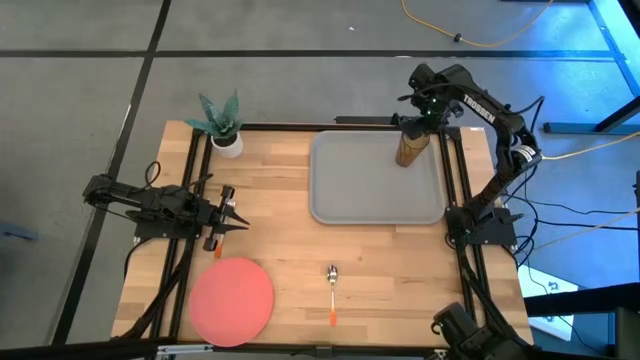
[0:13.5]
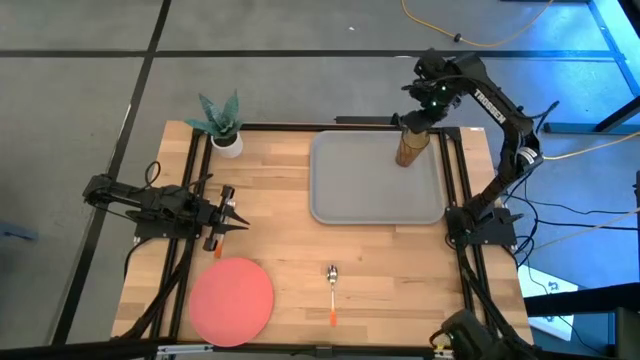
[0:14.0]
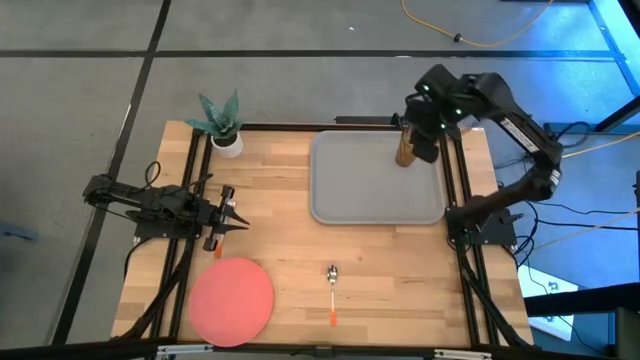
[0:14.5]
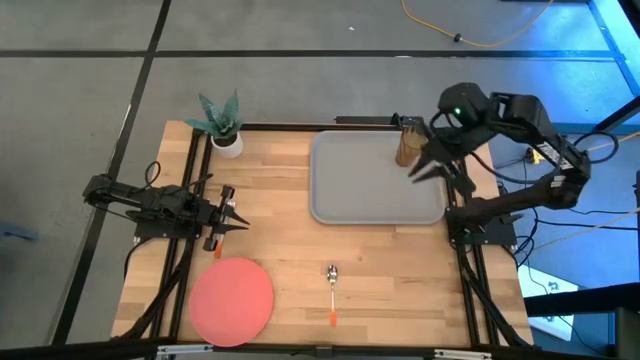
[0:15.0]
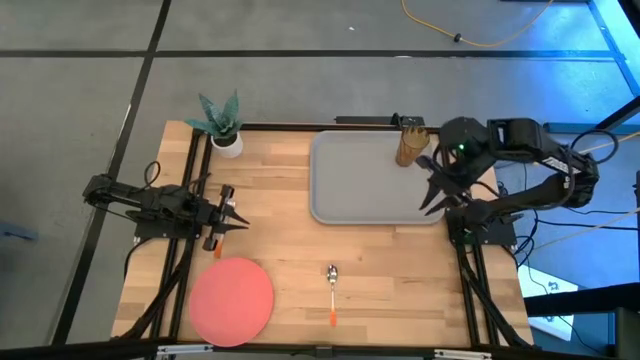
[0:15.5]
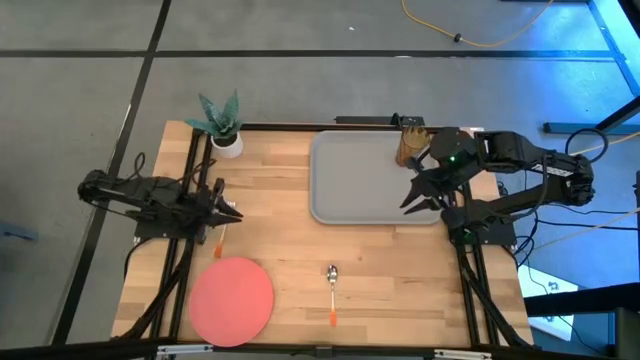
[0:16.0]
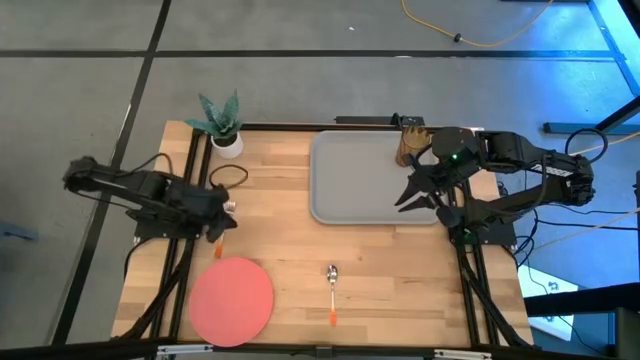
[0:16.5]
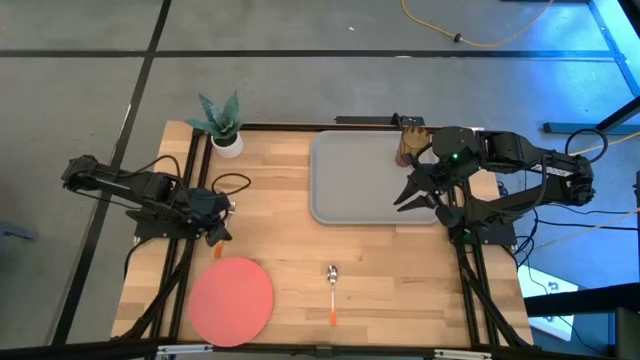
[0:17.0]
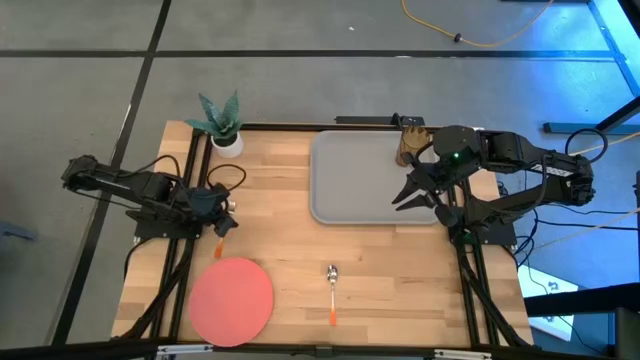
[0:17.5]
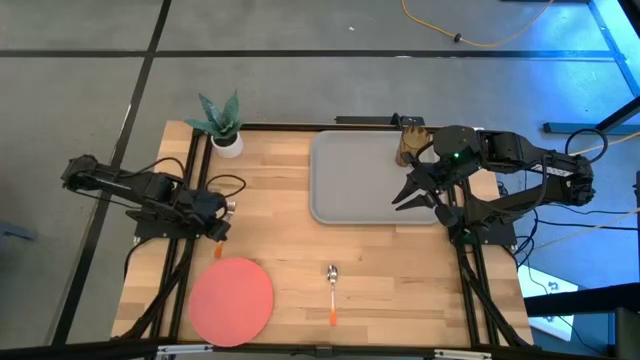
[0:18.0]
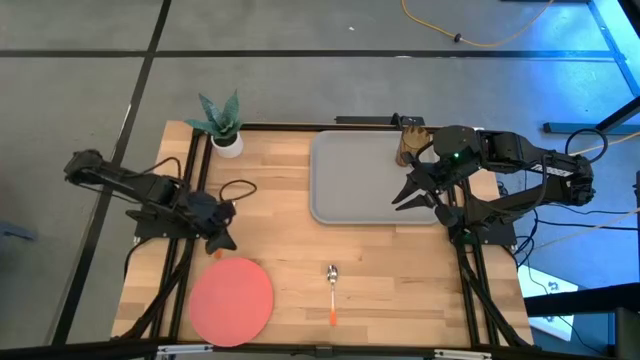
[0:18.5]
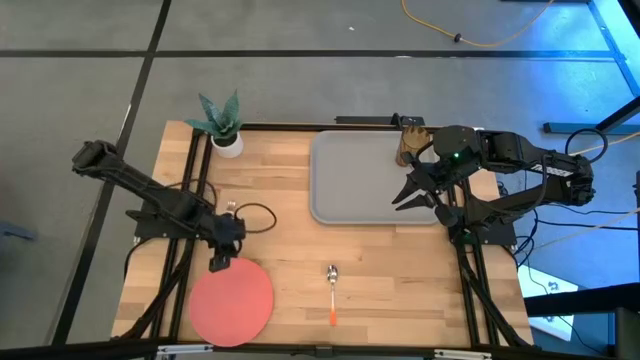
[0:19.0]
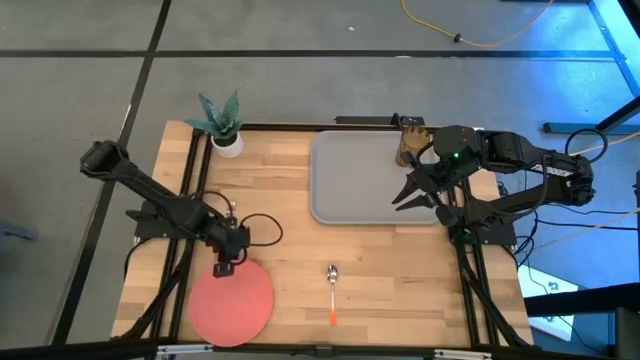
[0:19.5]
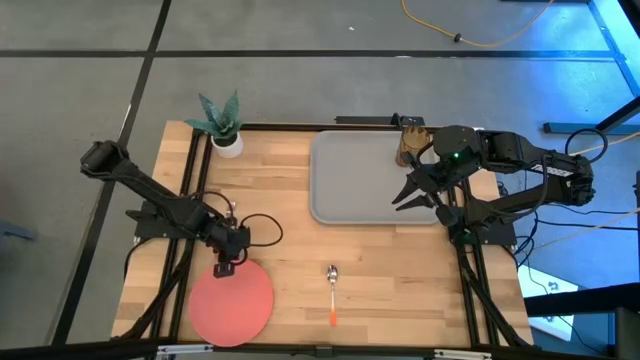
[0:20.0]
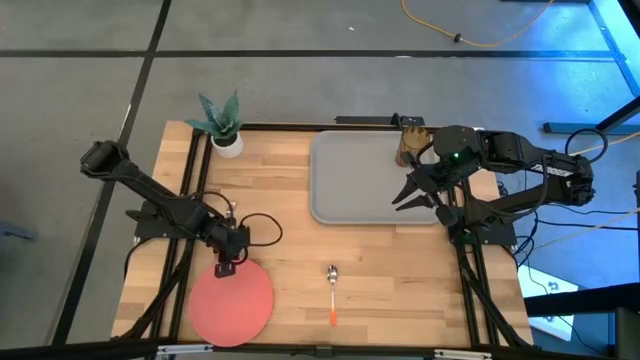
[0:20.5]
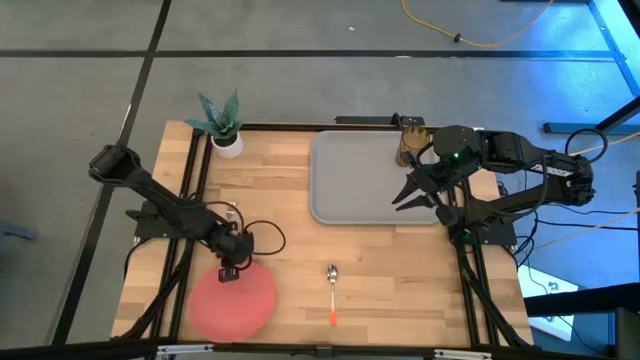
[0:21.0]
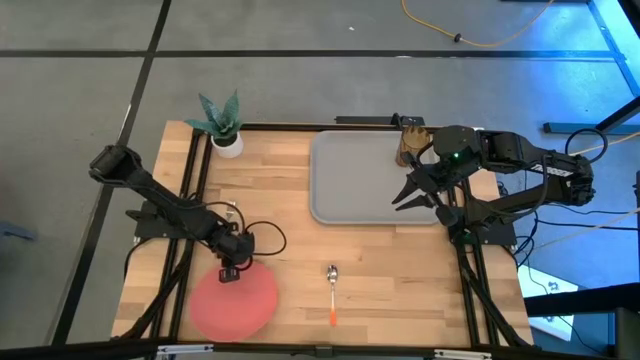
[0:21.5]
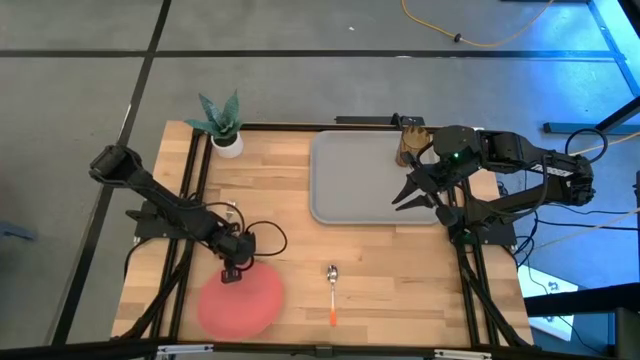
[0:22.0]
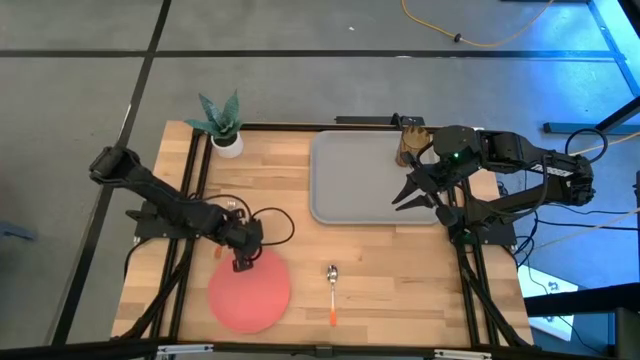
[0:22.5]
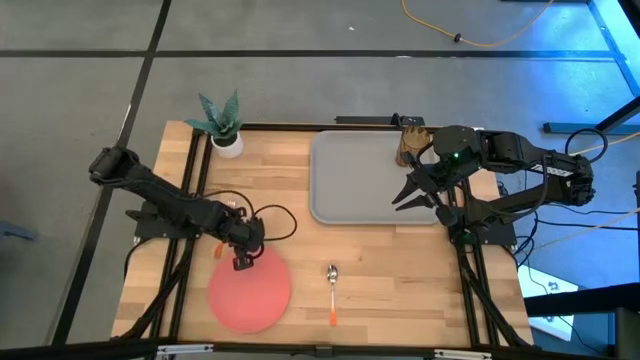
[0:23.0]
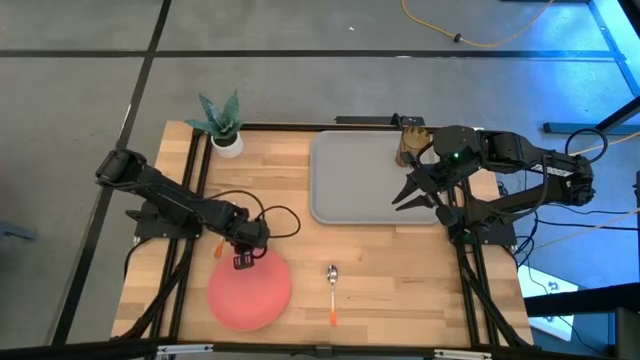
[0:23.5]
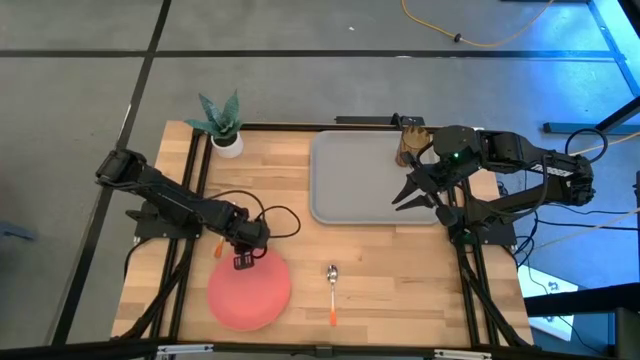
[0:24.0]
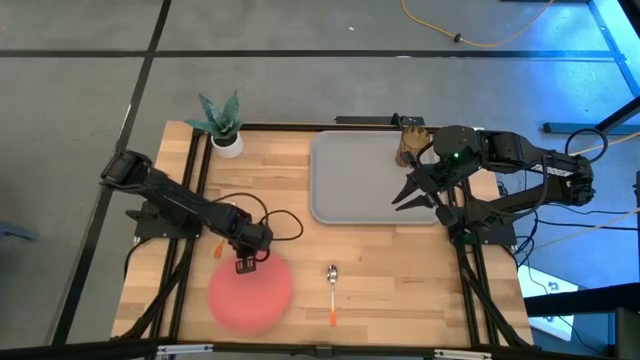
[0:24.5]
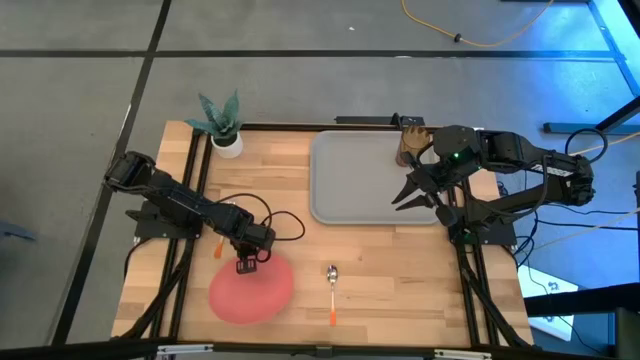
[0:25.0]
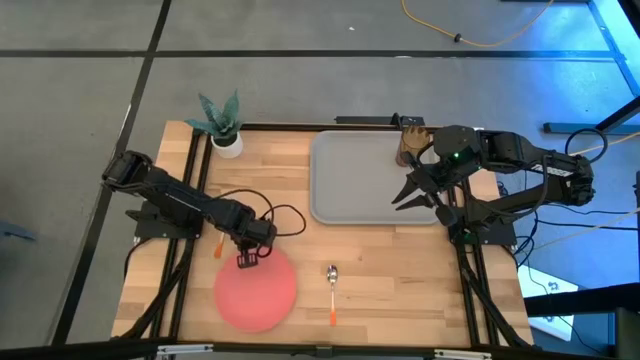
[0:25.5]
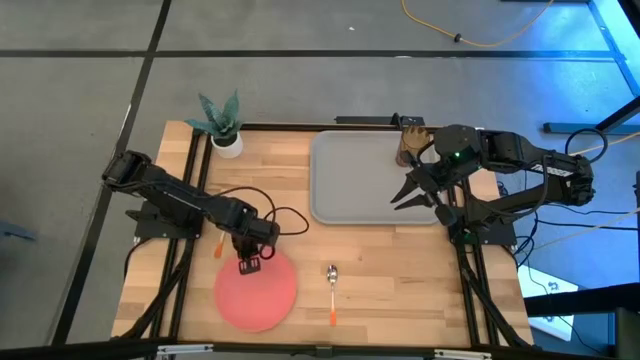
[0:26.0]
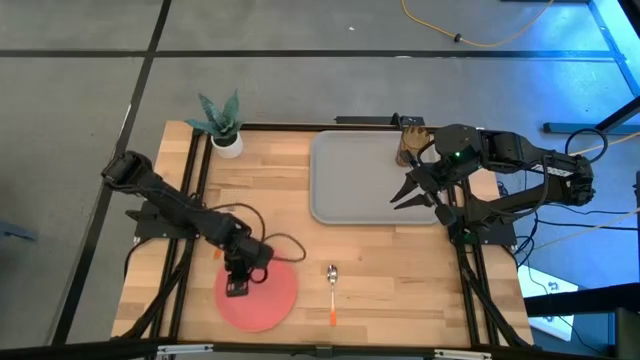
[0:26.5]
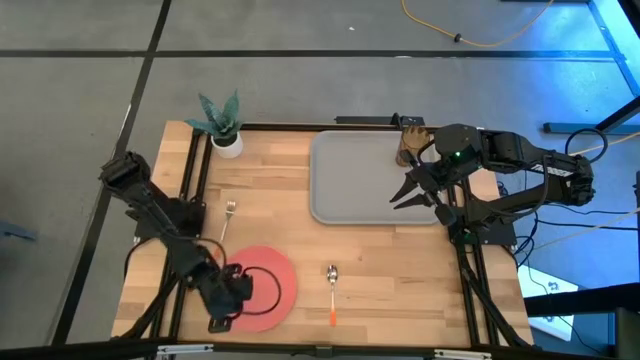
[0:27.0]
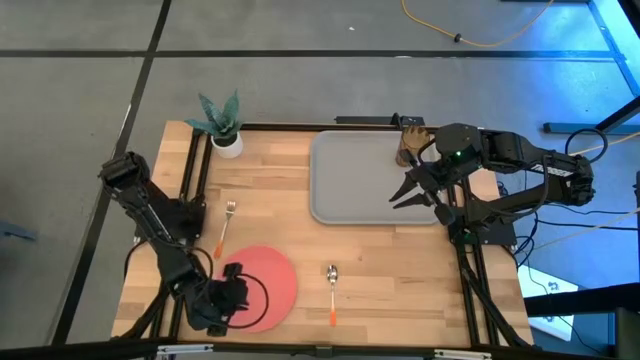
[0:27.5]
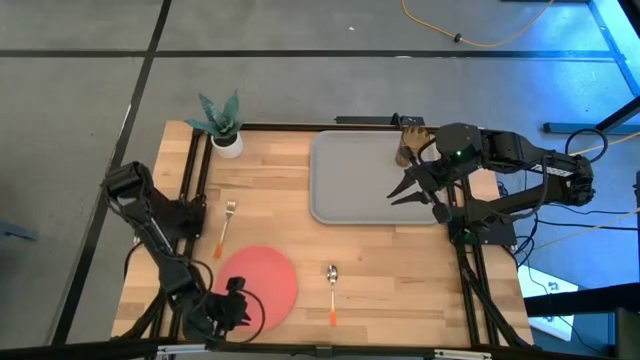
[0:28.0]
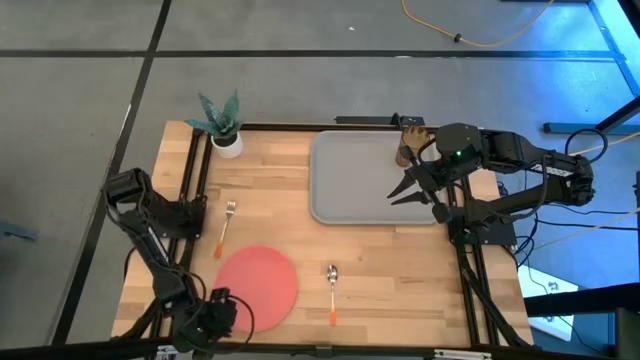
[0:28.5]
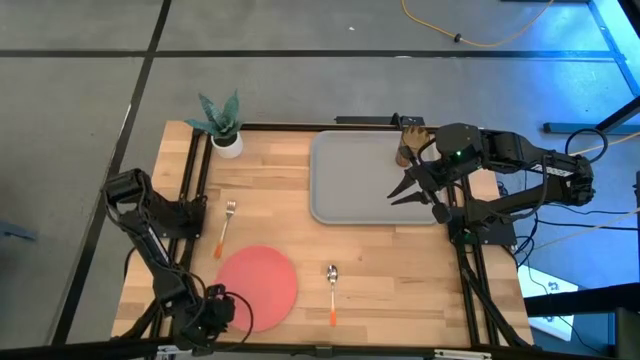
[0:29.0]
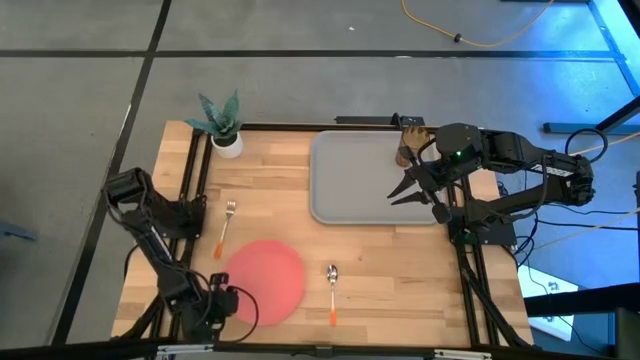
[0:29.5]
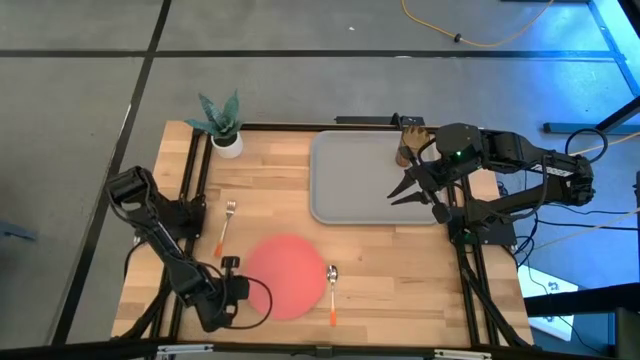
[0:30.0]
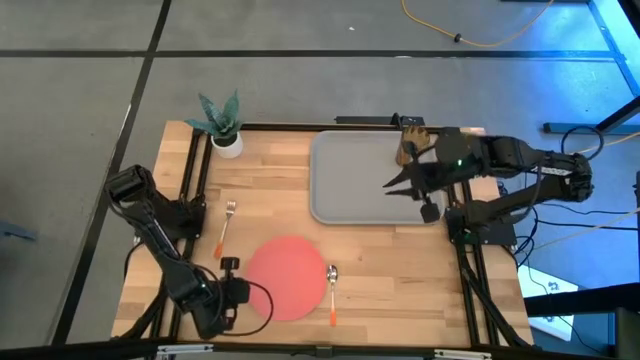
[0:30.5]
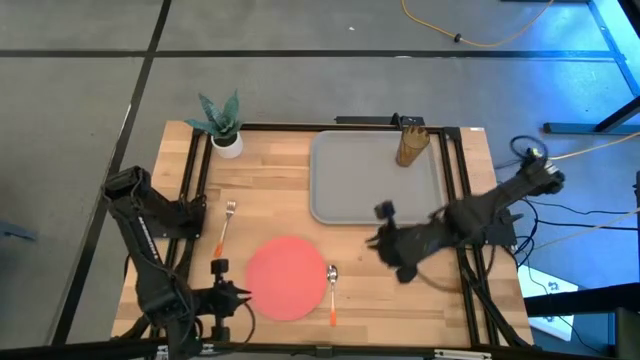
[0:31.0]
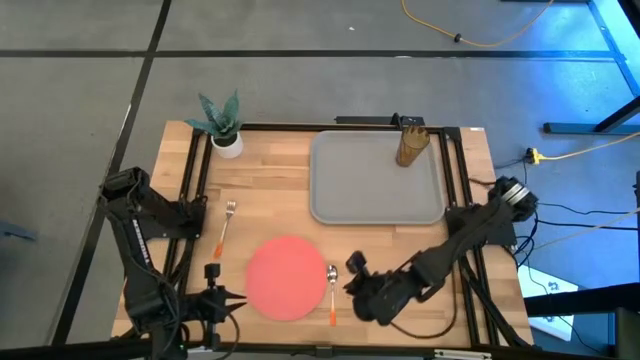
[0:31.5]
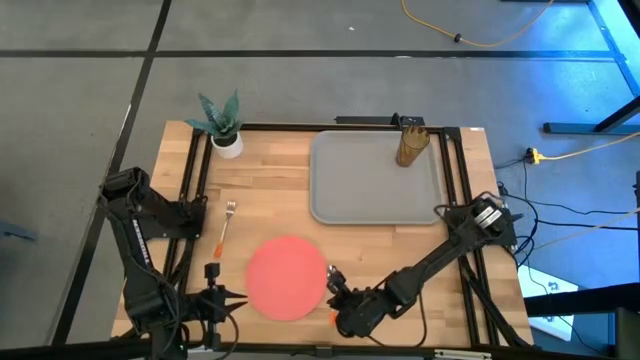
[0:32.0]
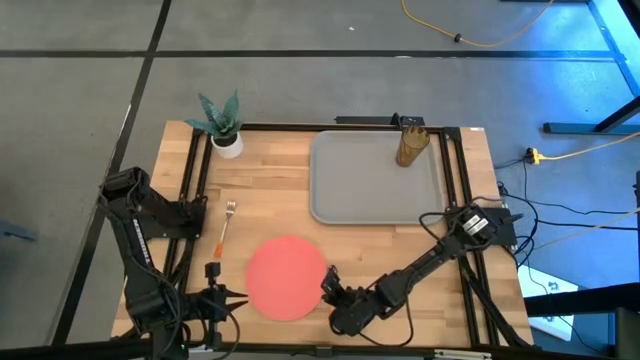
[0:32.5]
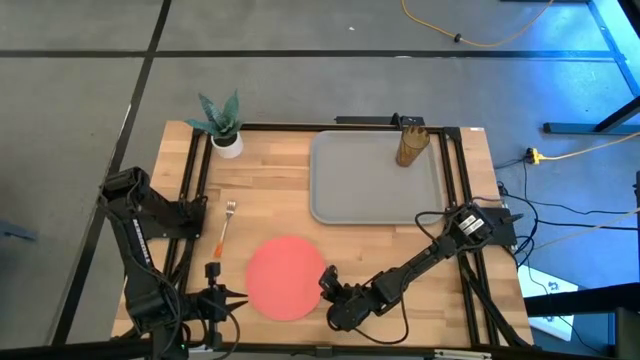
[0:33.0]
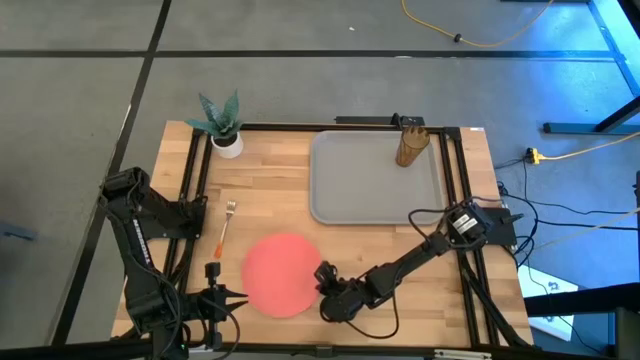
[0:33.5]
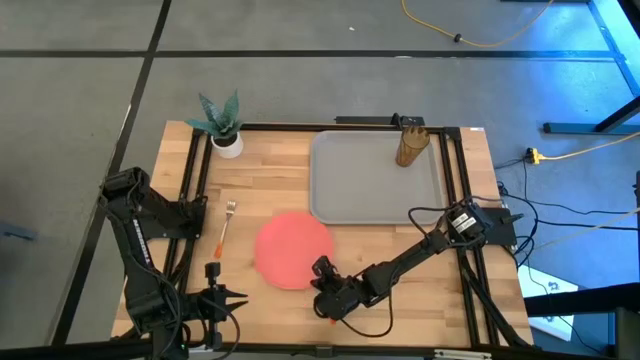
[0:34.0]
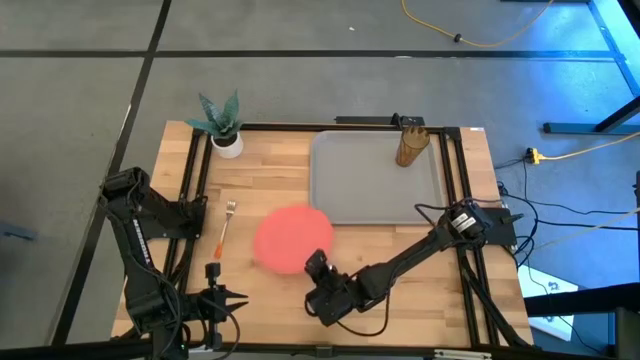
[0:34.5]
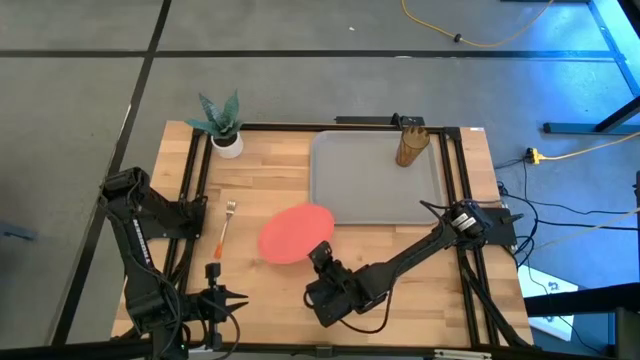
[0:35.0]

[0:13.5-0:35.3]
Task: Pick and place plate/cup/fork/spoon on tray
Put the pink plate on the gray serving tray to the bottom left of the orange glass
